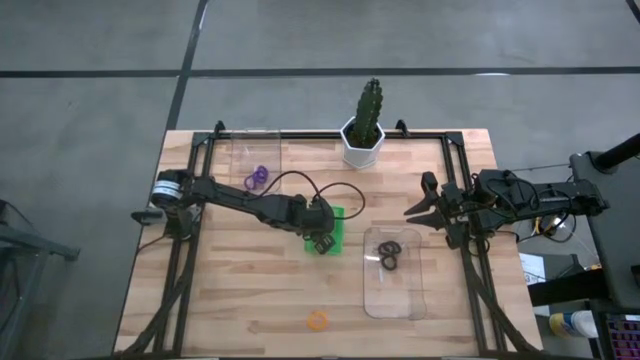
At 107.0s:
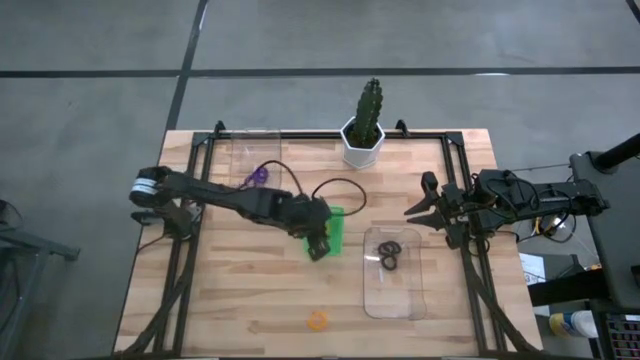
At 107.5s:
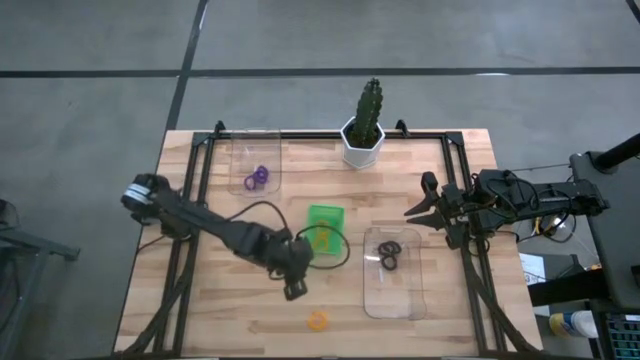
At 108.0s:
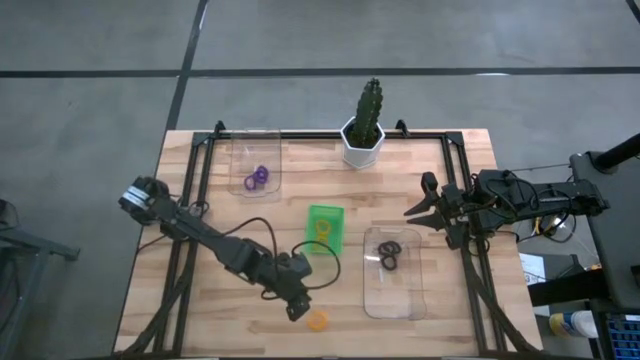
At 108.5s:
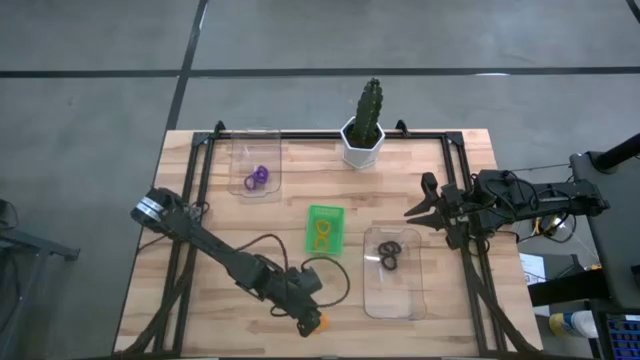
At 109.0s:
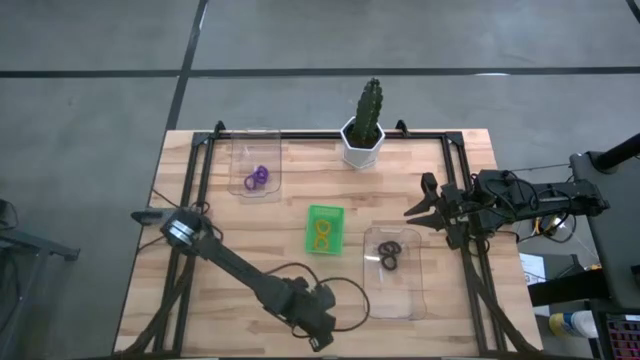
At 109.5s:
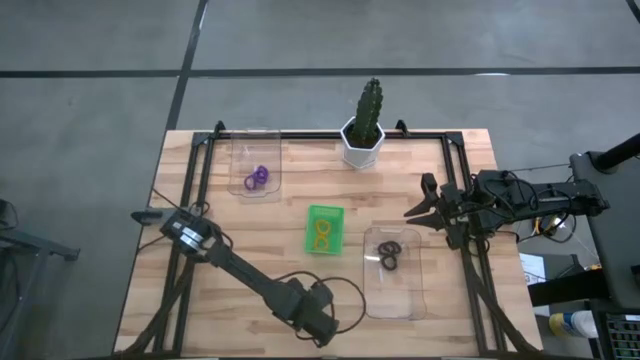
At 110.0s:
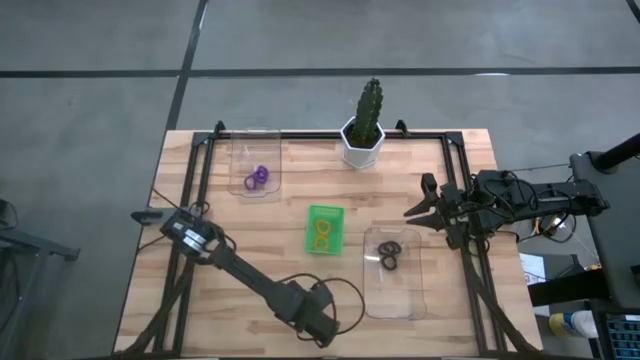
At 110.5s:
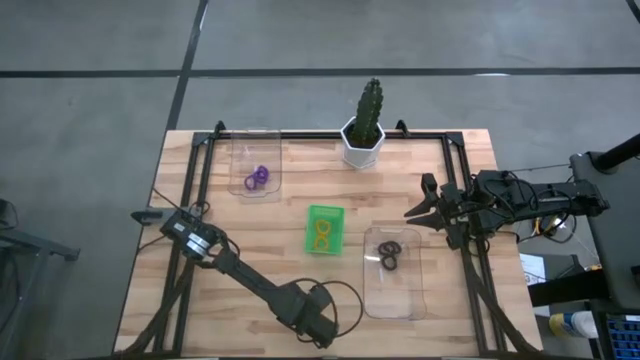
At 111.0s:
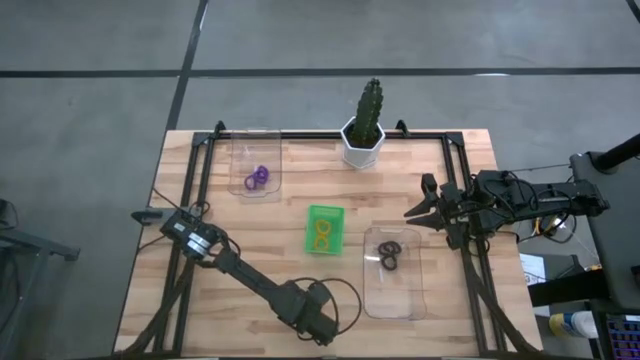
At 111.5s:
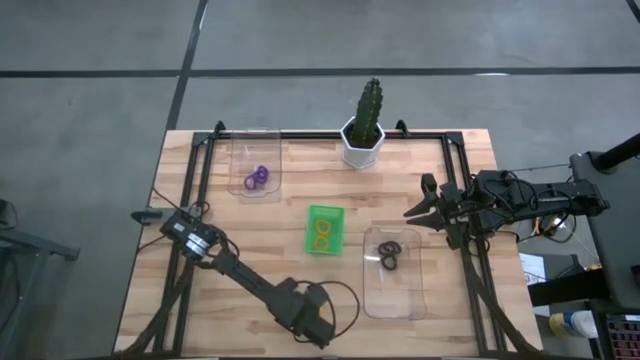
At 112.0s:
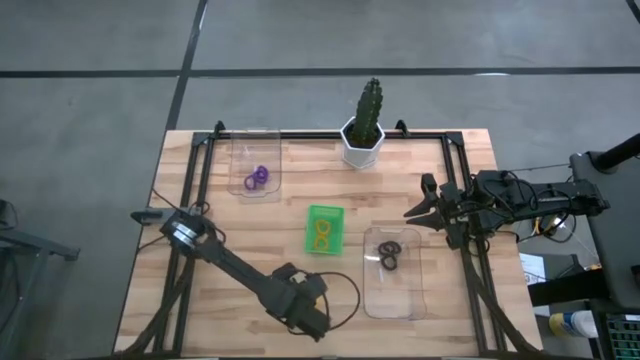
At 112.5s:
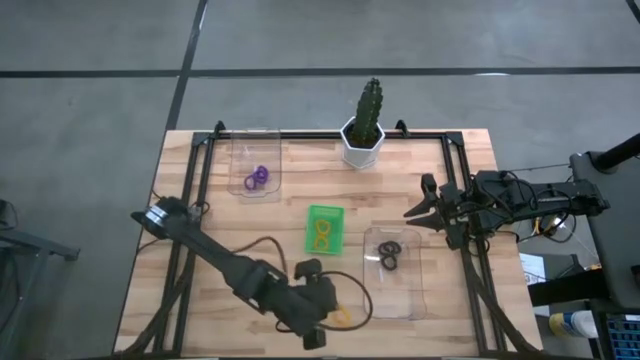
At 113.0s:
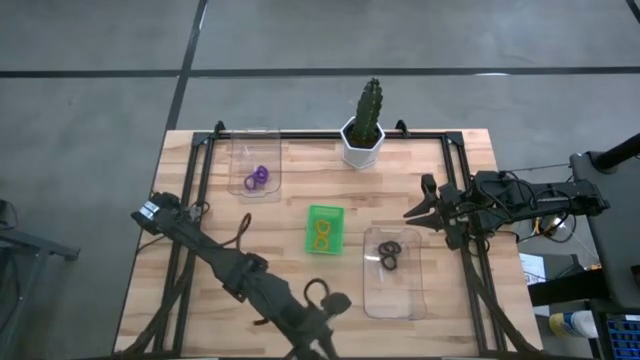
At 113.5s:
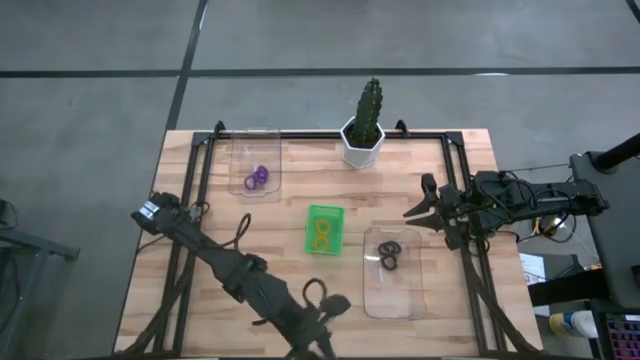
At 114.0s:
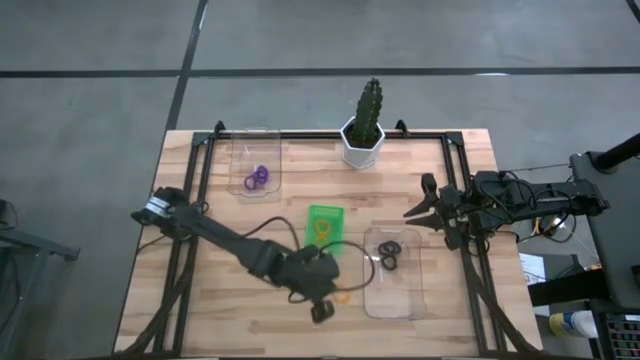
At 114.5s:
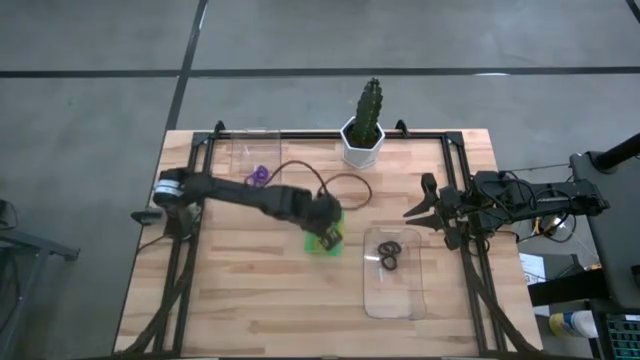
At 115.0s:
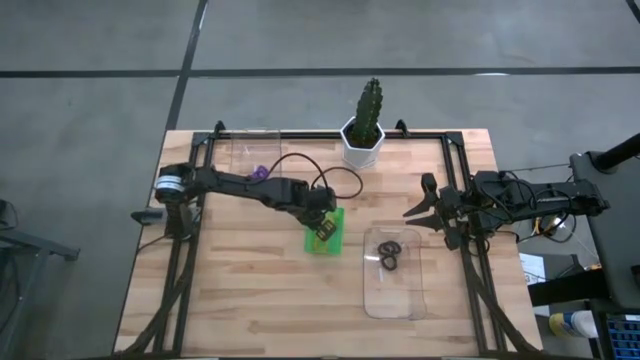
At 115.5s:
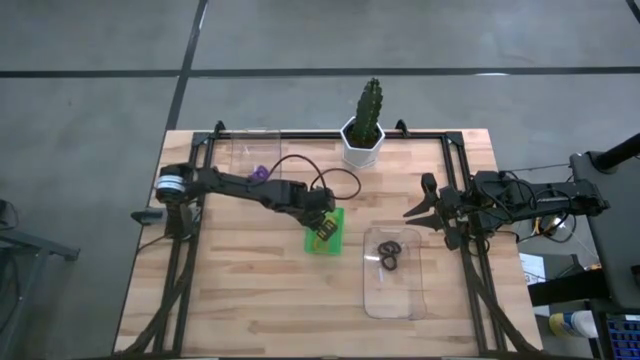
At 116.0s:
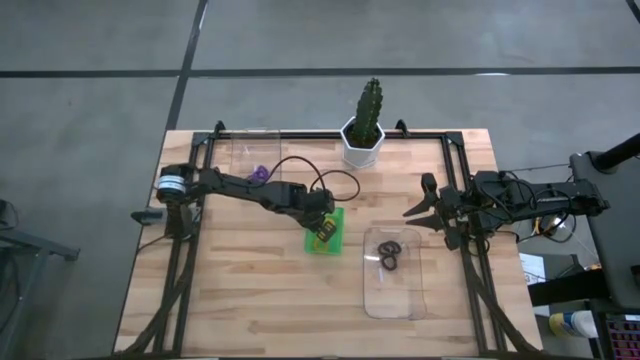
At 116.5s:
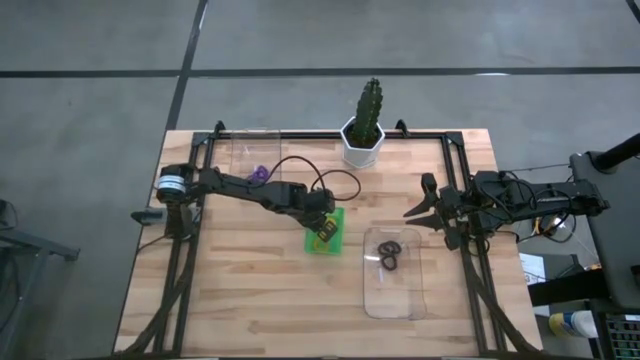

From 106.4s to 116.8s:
Task: Sort spring keychains
Put the yellow orange keychain into the green bin

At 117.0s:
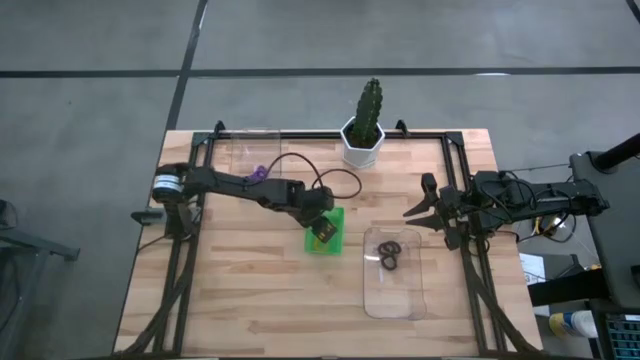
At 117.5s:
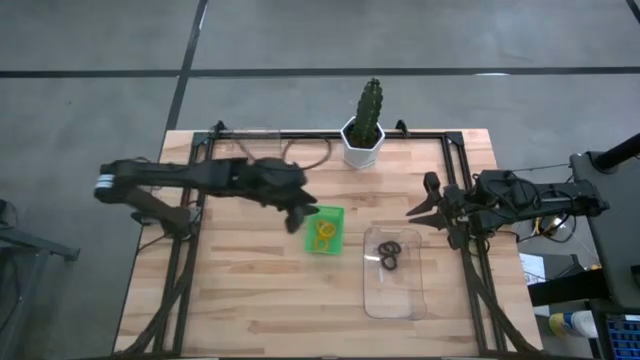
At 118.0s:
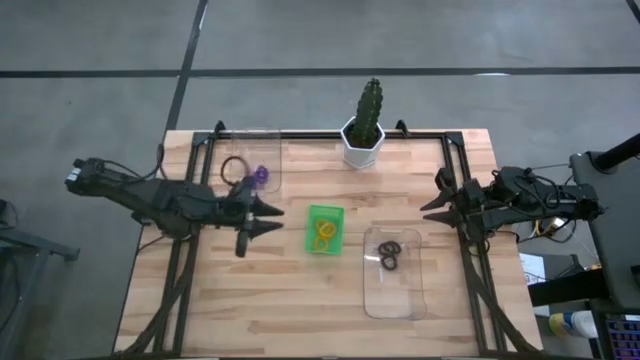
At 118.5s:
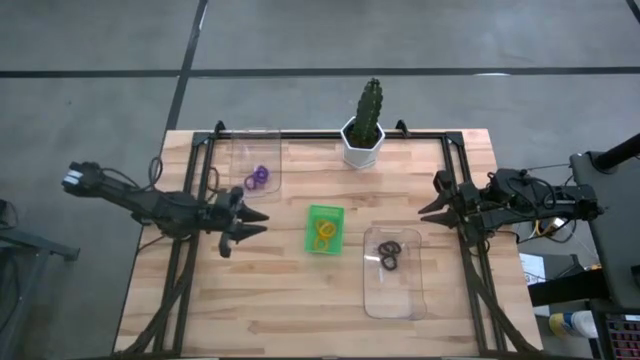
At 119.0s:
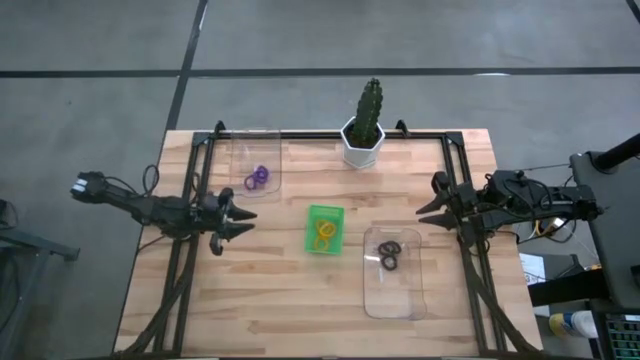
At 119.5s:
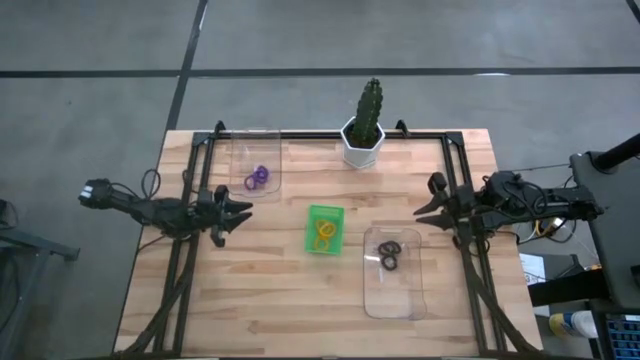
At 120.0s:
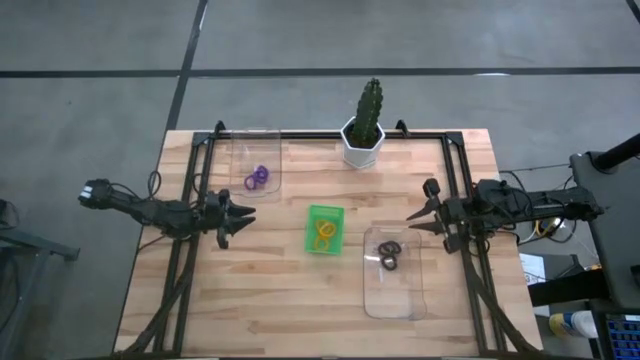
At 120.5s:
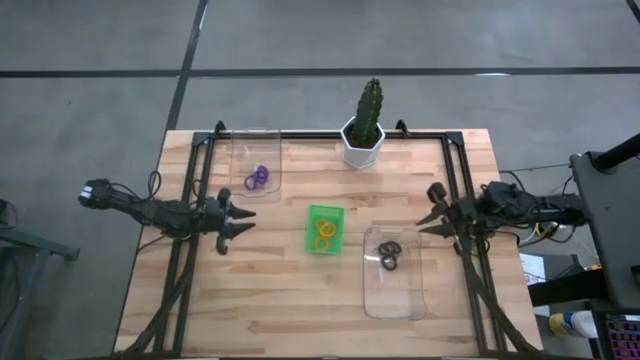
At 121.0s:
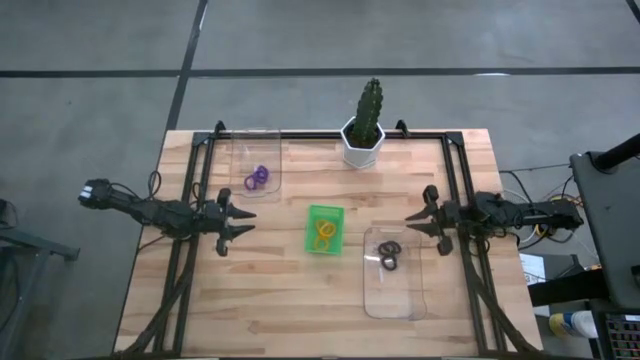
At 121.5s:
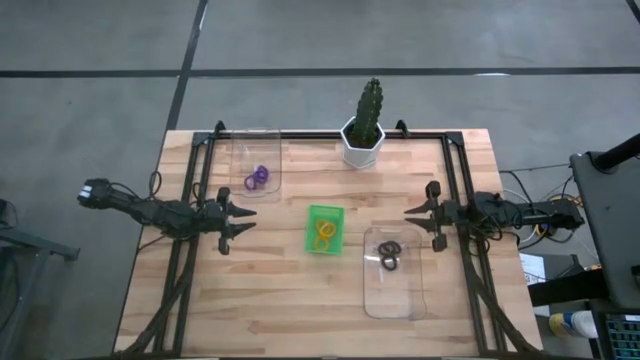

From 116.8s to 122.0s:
Return to Home Position

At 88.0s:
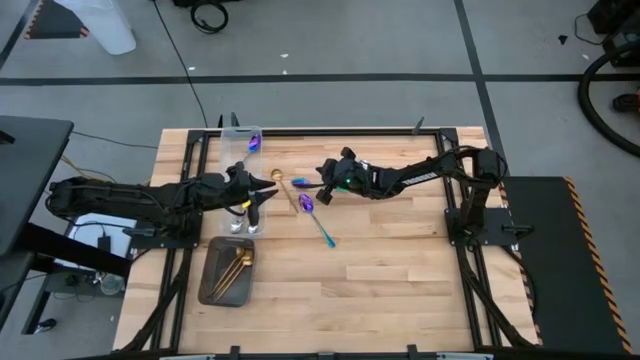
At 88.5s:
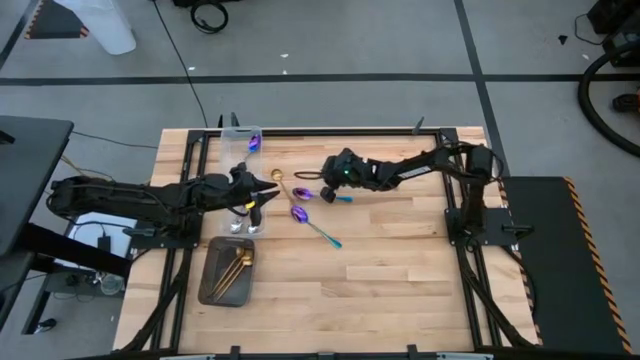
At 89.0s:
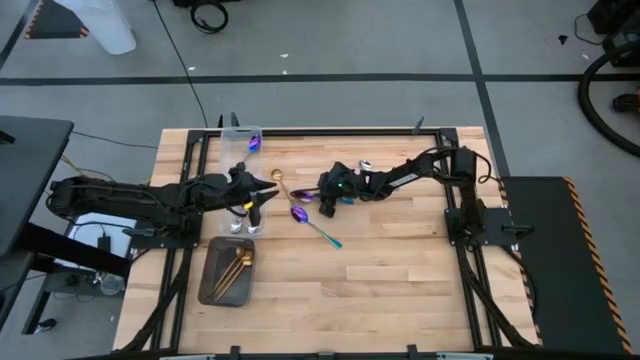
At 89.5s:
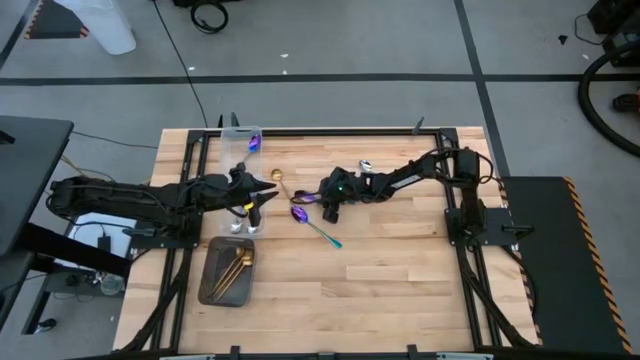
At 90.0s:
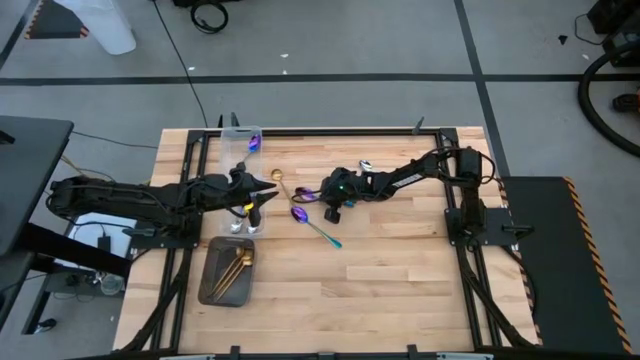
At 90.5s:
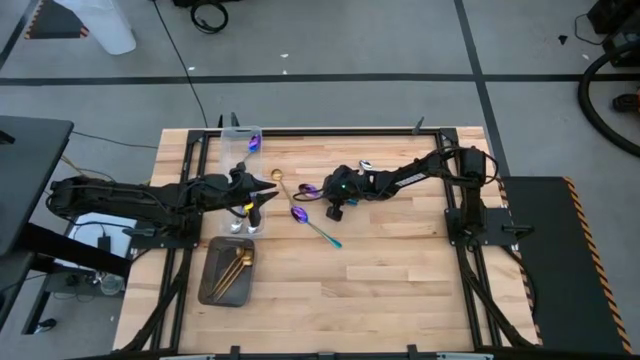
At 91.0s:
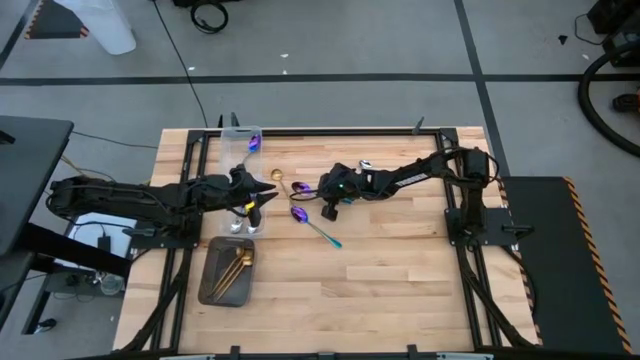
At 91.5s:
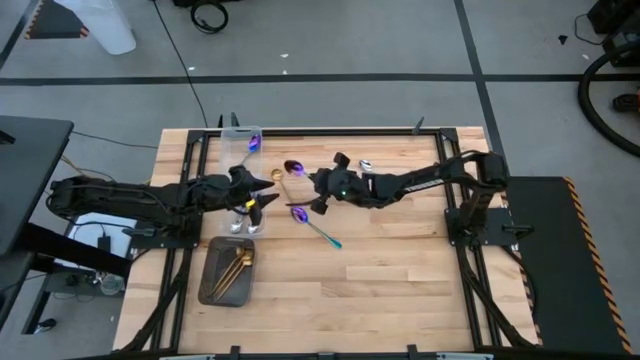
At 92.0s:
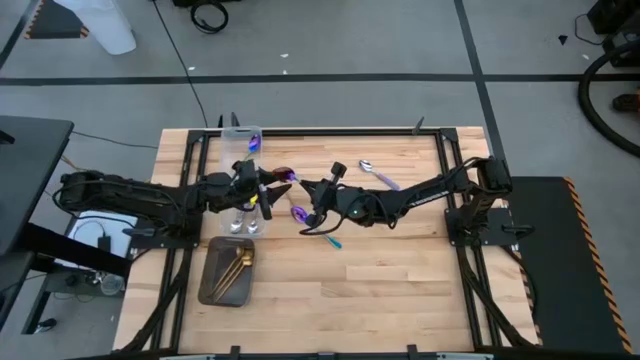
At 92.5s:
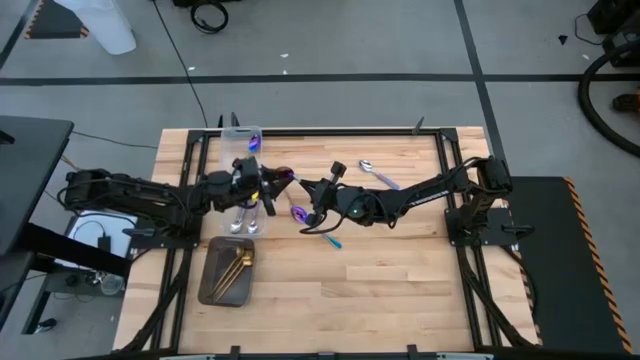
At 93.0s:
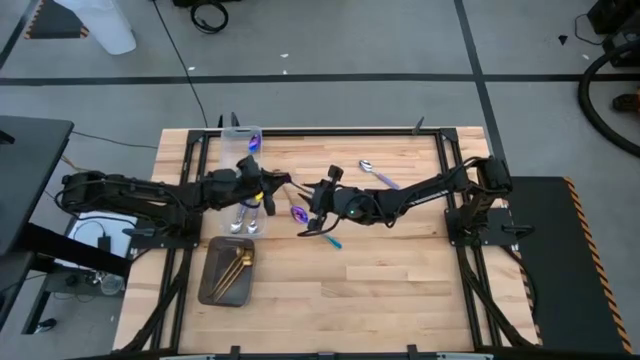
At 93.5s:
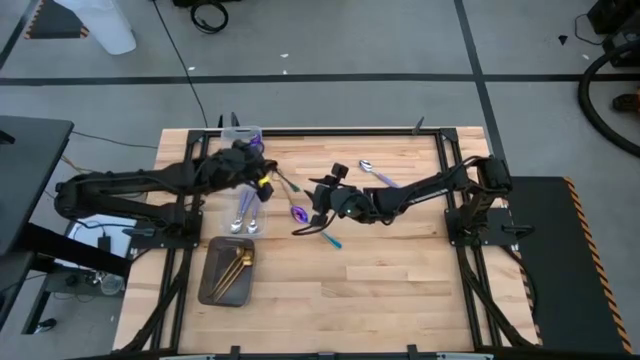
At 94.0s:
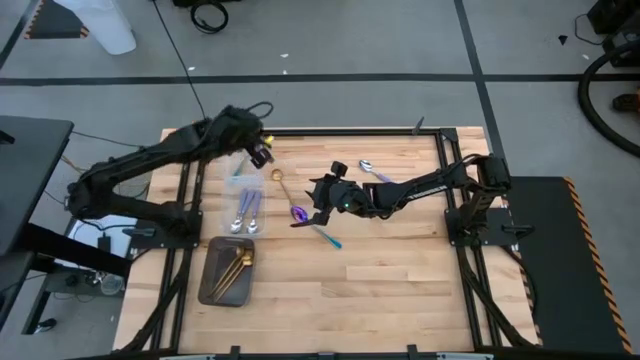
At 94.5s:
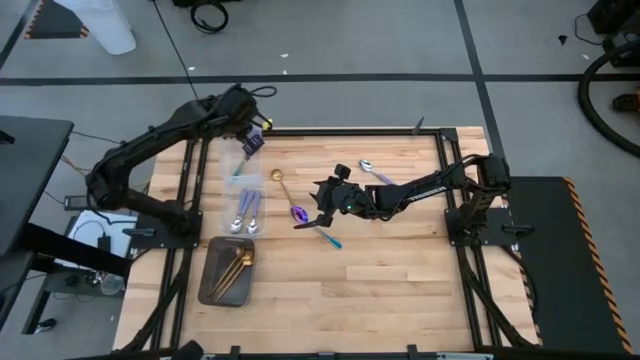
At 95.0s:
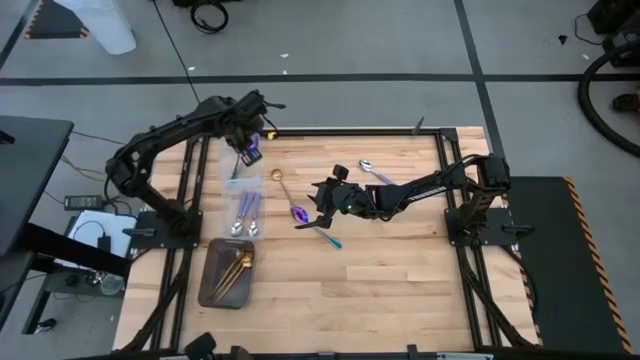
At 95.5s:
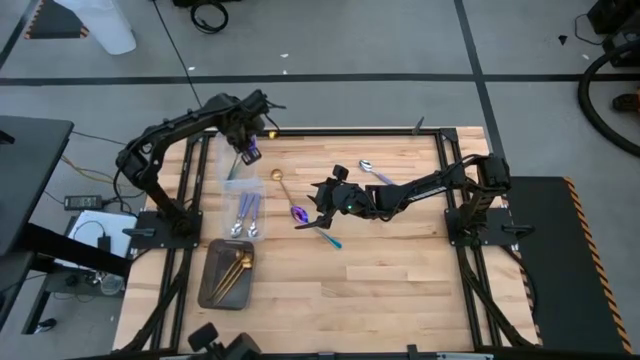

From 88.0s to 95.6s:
Task: Sort silverware by color (type)
Put the purple spoon into the top transparent bin
